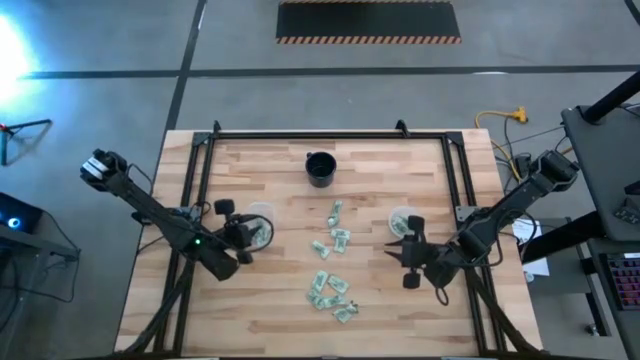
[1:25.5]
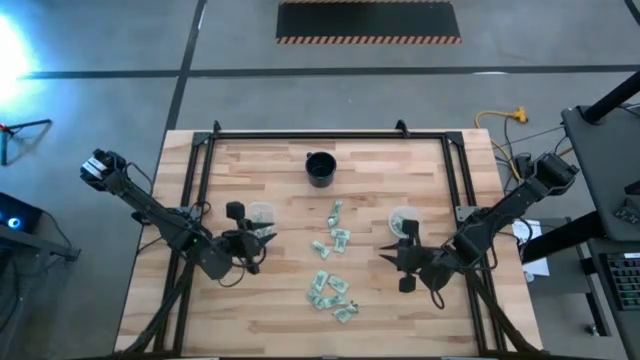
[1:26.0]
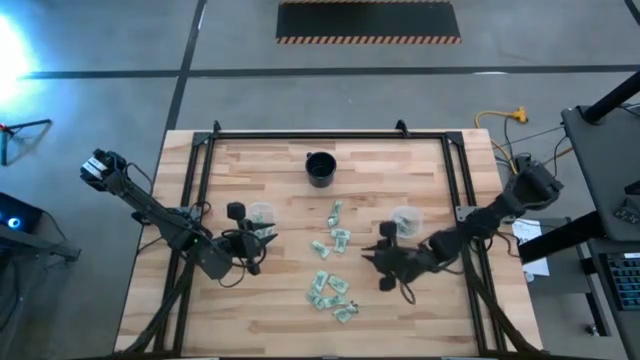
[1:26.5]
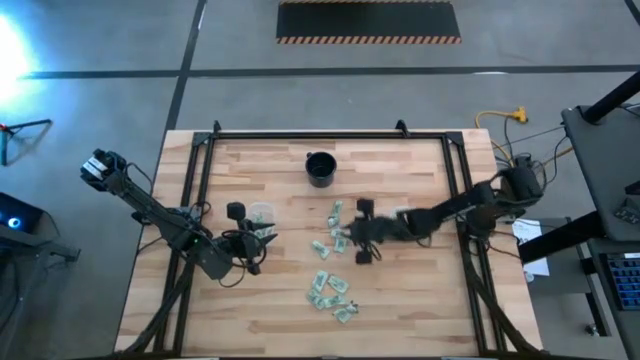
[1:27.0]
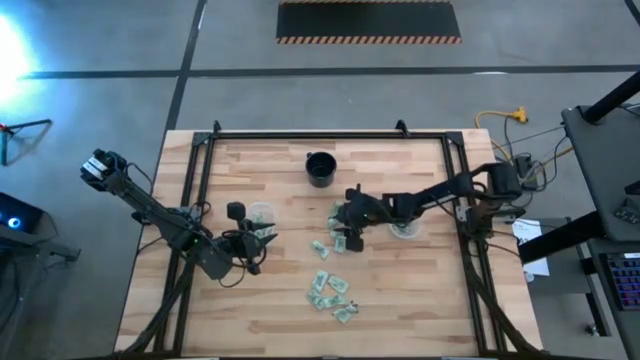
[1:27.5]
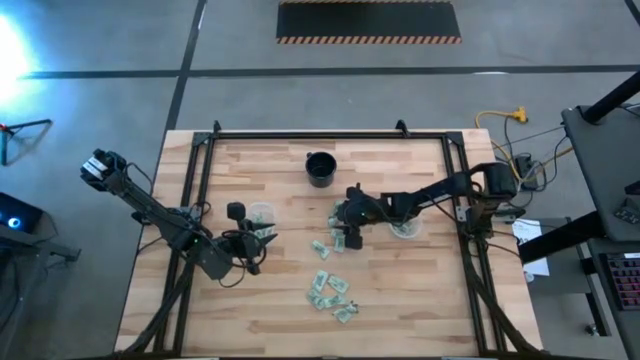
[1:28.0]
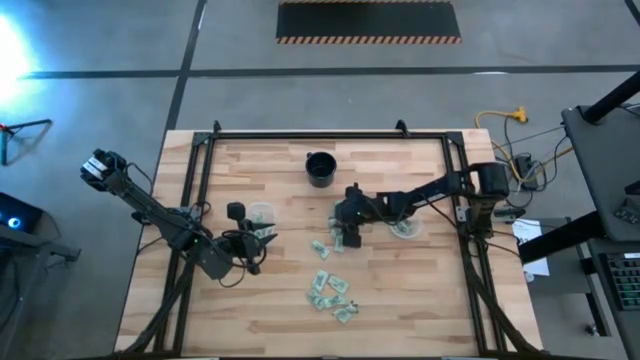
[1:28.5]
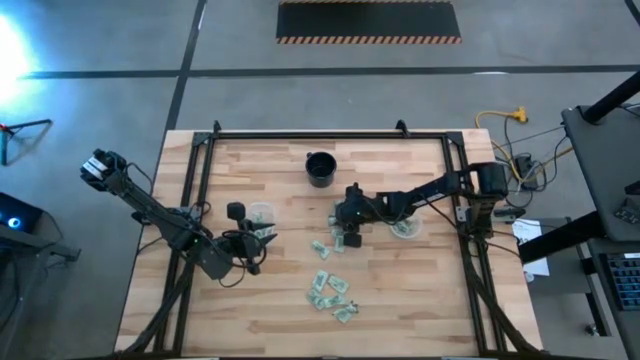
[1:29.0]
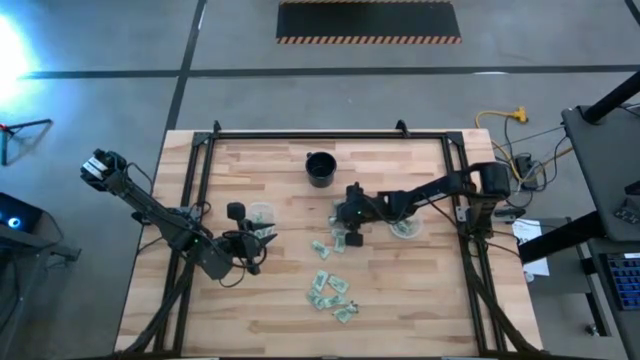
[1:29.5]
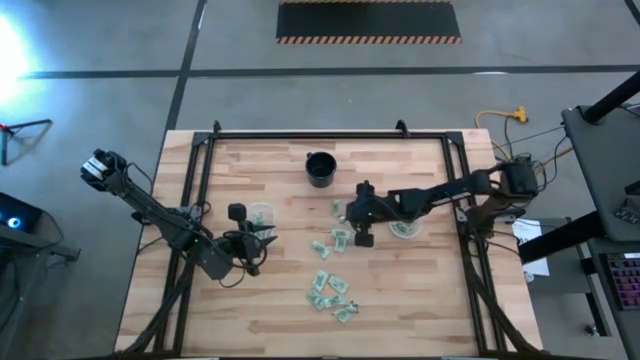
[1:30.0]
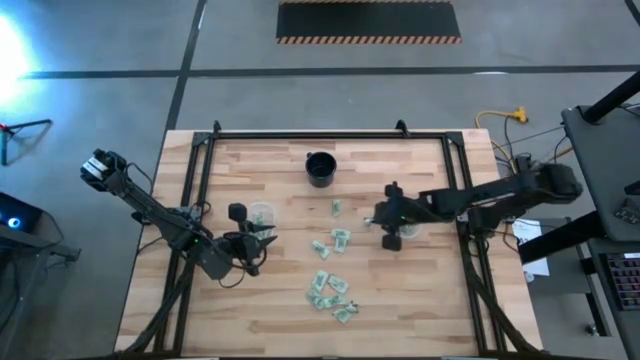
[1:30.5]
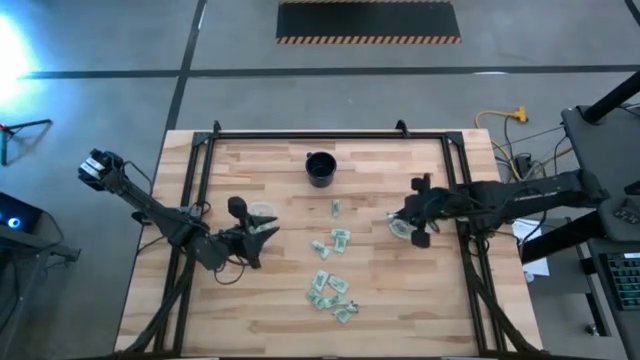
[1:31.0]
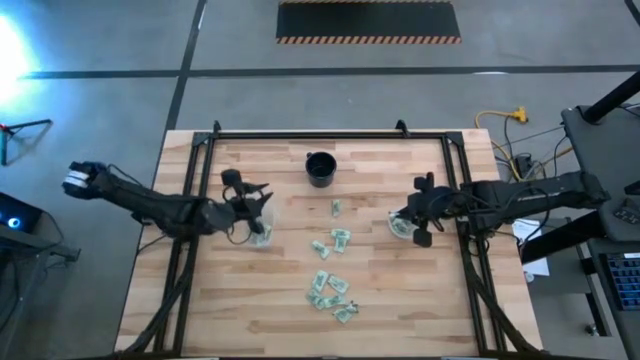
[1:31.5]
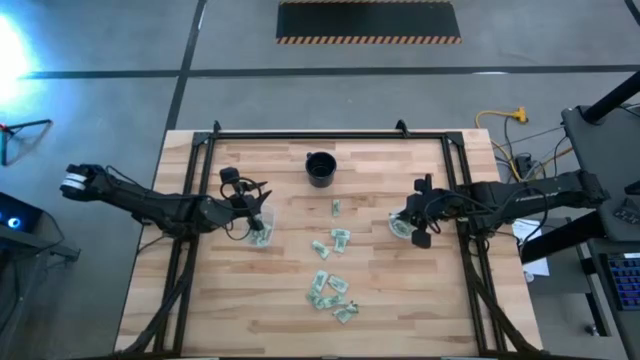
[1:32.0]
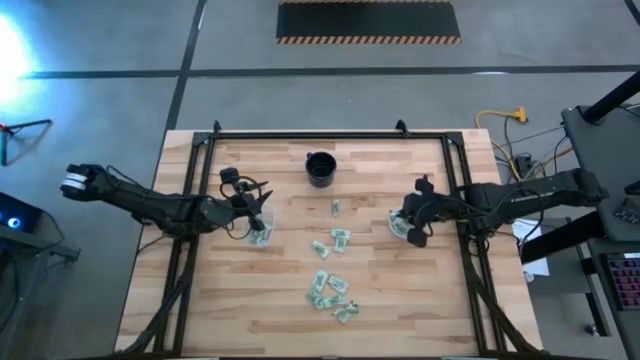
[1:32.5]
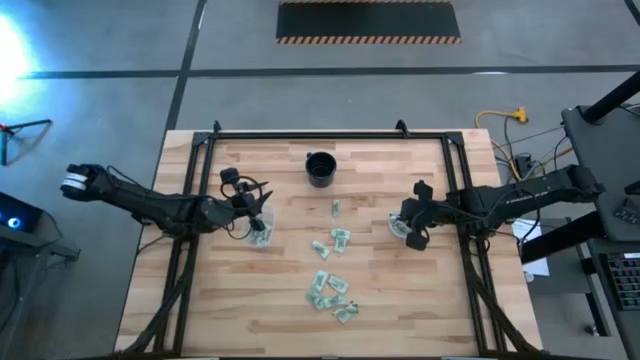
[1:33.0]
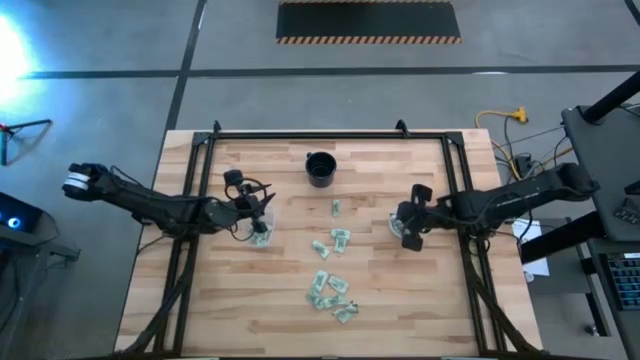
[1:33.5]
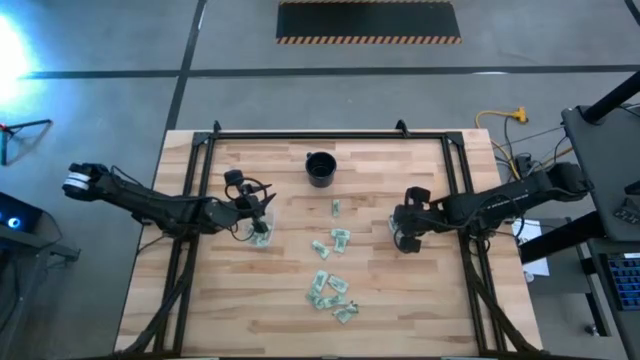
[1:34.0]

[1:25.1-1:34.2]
Task: Pick and place Stevia / Truvia into bins
Put the green stevia packet into the circular container

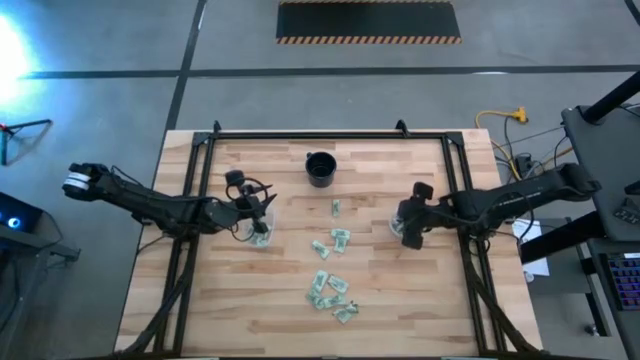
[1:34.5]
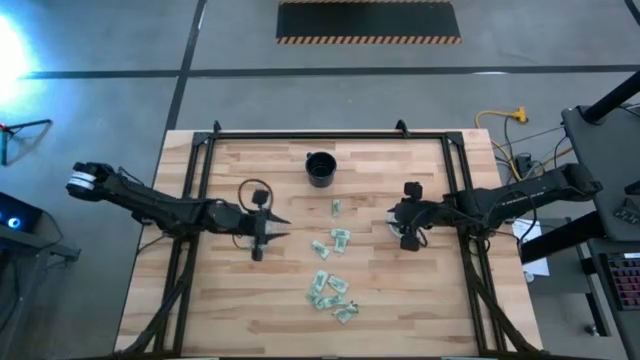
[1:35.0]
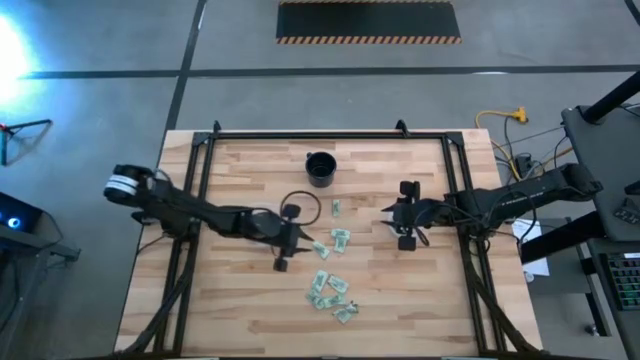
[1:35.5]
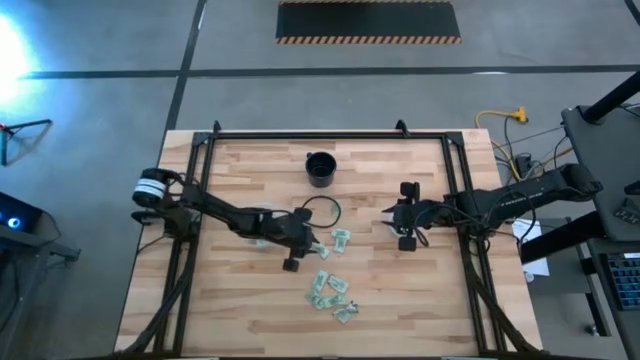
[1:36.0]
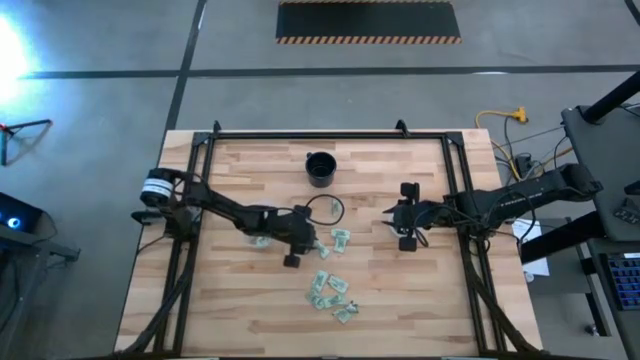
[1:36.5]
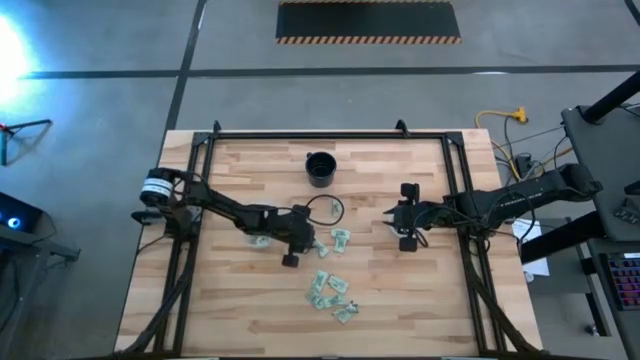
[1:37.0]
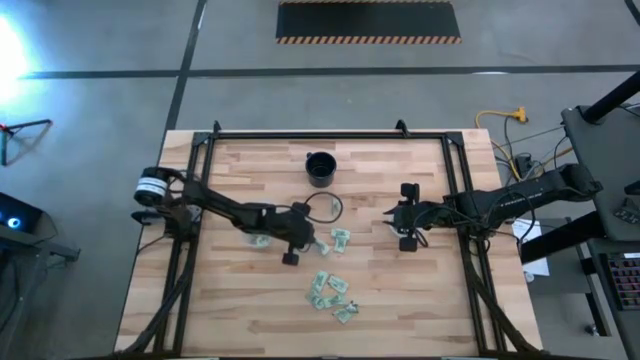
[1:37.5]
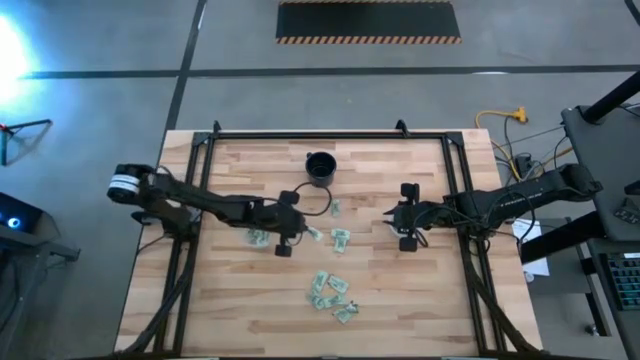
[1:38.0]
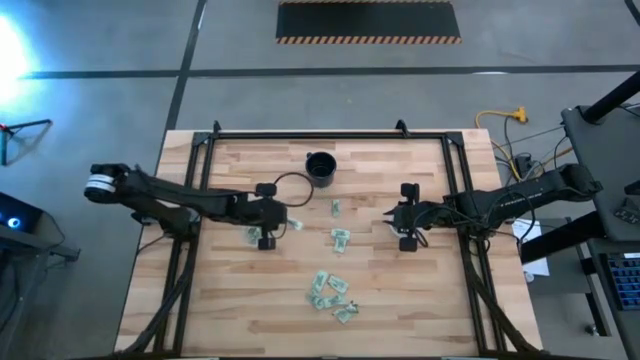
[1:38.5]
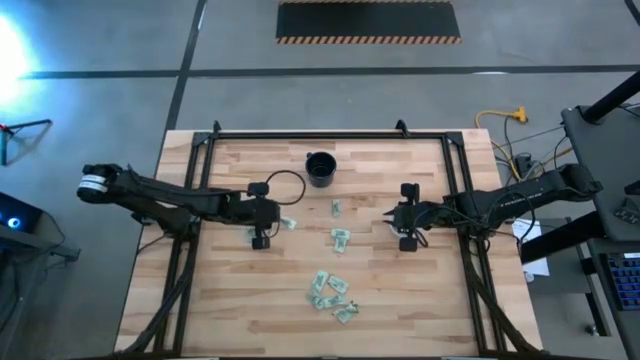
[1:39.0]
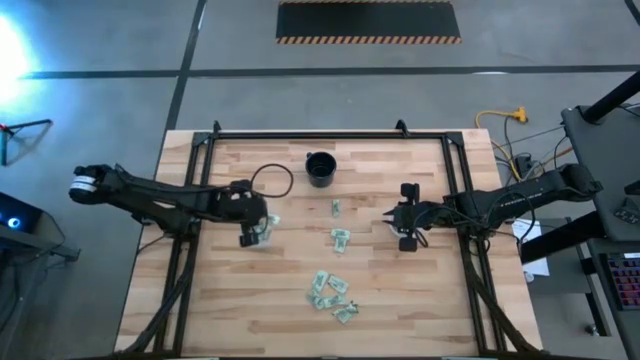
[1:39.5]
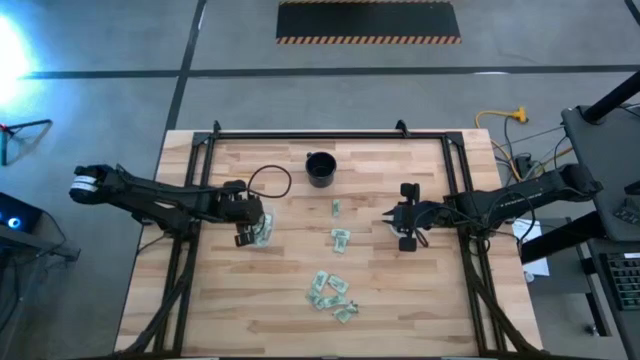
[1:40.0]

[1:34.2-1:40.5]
Put the light green stevia packet into the rectangular container

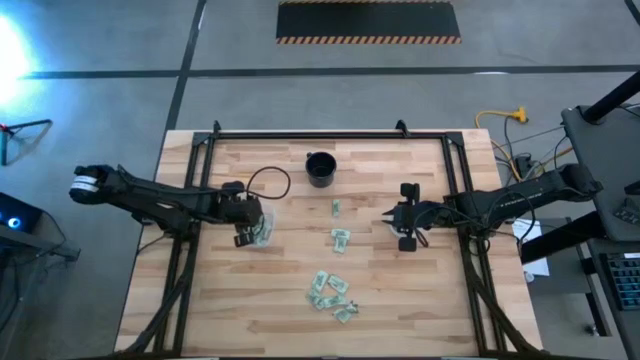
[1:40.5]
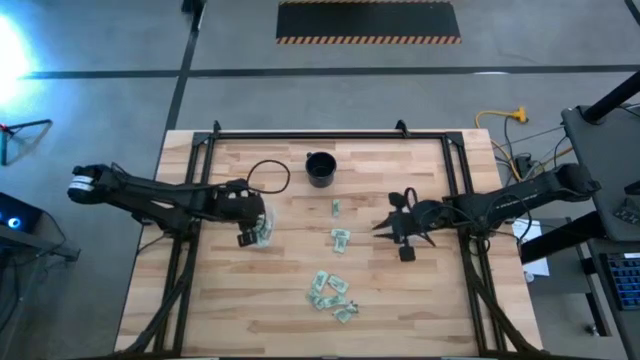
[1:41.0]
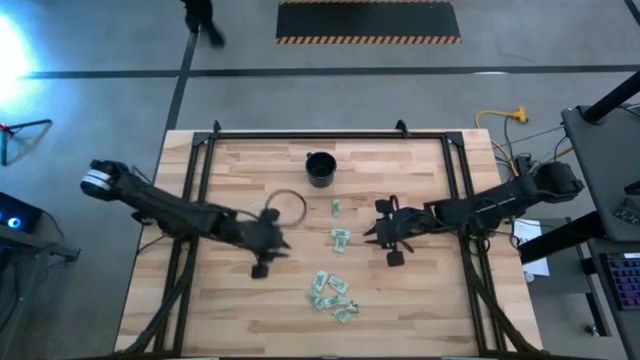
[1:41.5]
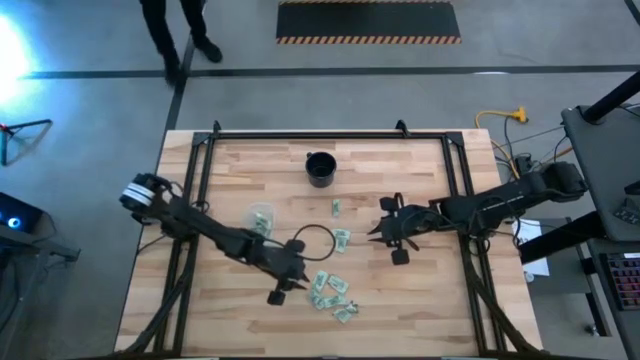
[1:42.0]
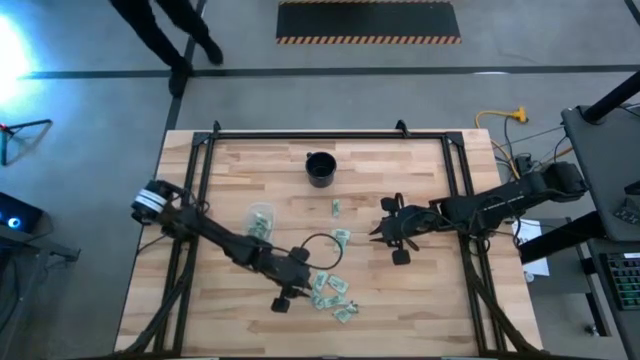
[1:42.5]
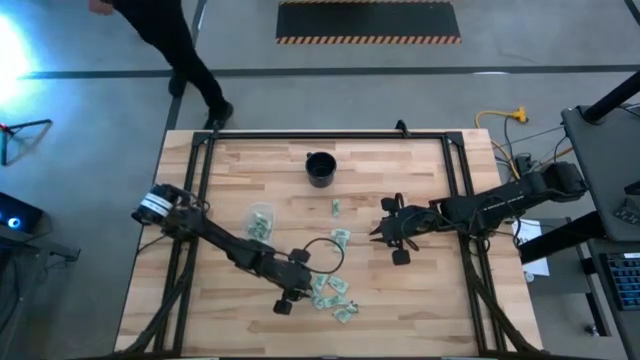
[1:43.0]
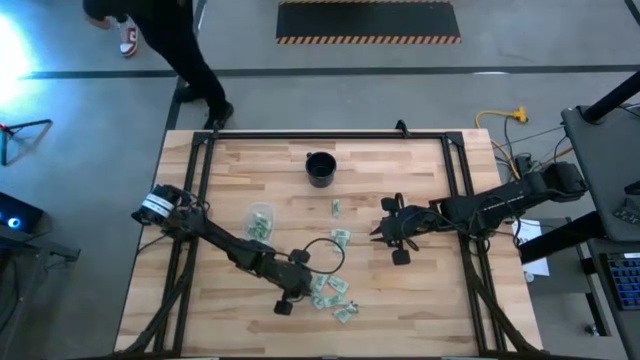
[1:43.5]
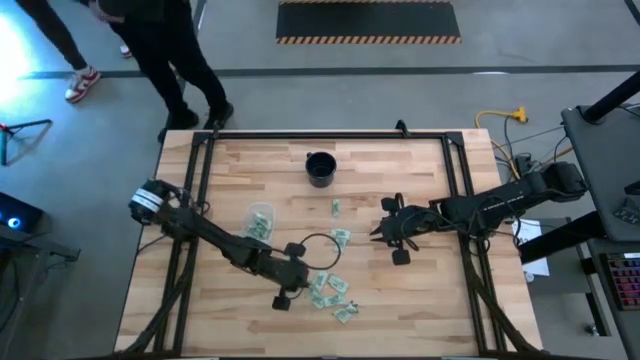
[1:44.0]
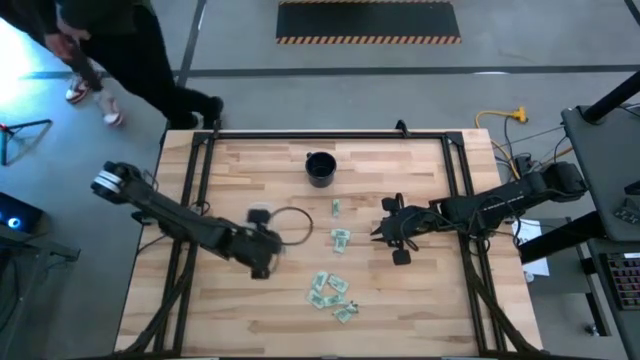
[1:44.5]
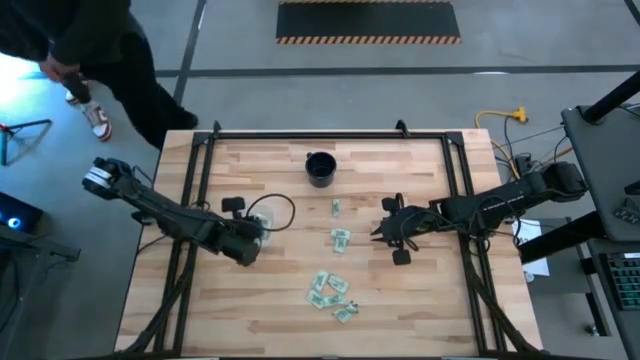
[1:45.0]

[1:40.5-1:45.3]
Put the light green stevia packet into the rectangular container

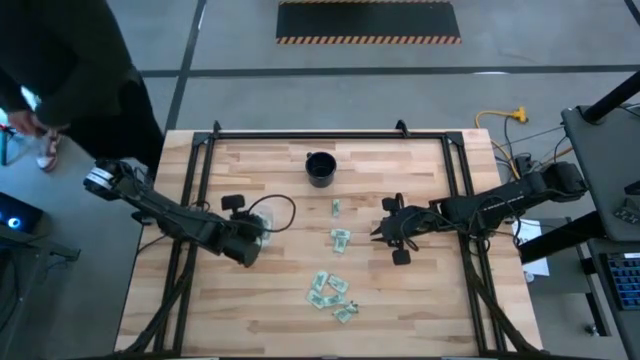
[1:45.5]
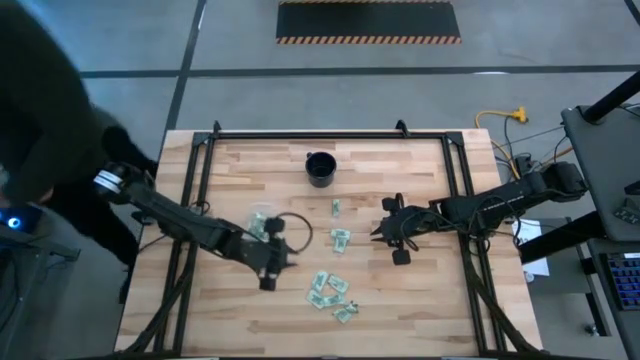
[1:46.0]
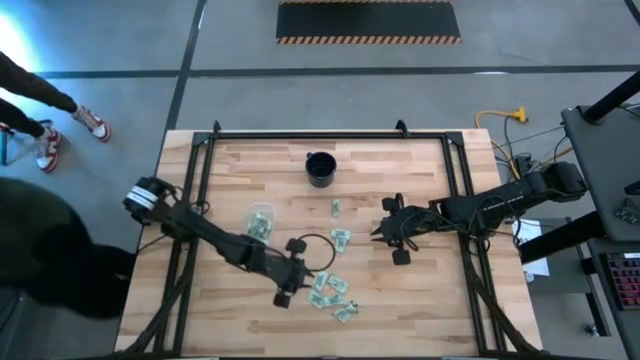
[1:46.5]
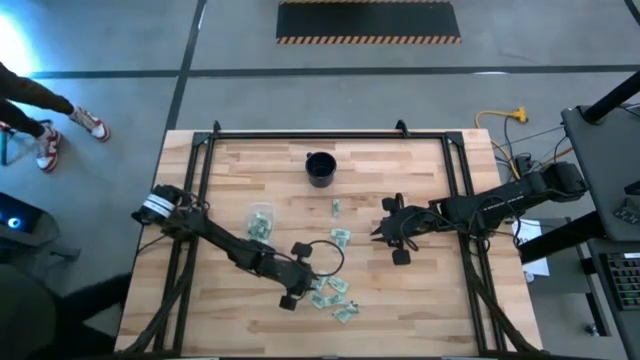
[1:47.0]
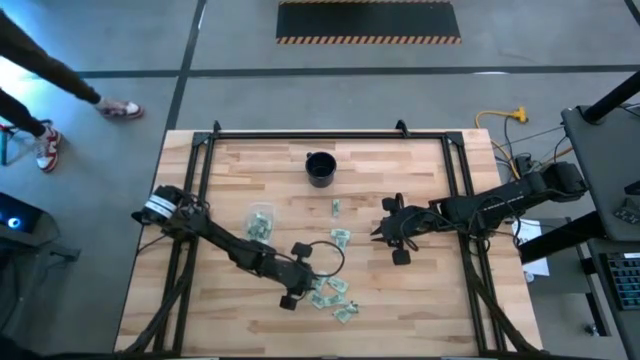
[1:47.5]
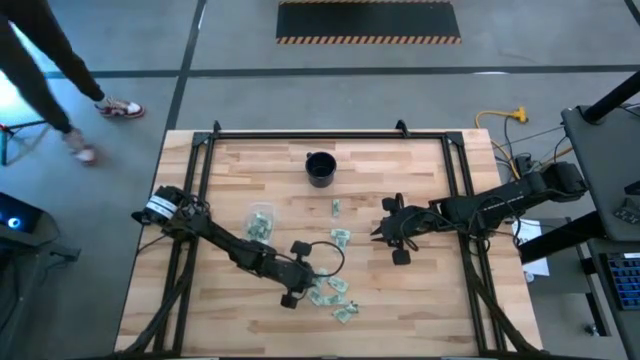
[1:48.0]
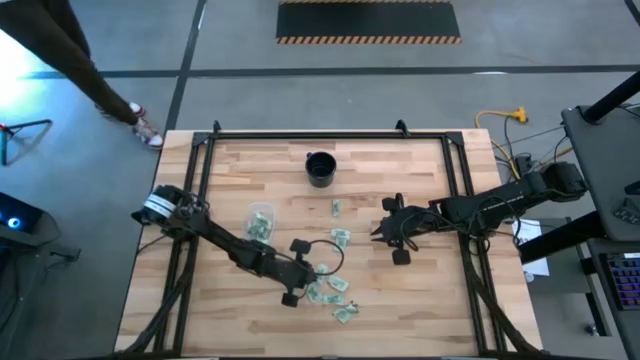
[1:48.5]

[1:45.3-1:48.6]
Put the light green stevia packet into the rectangular container
